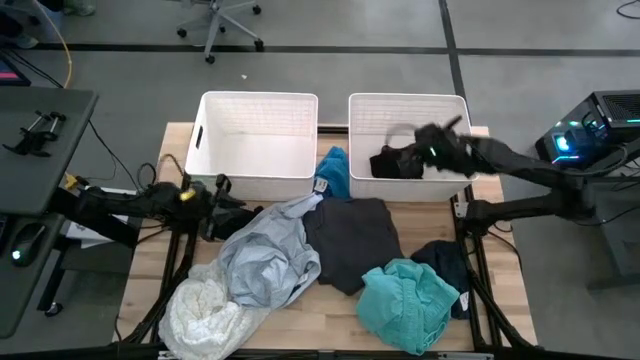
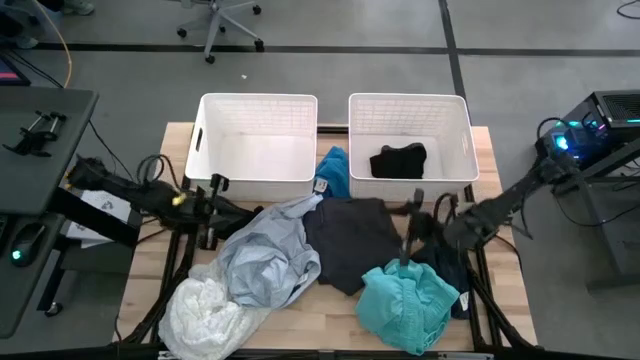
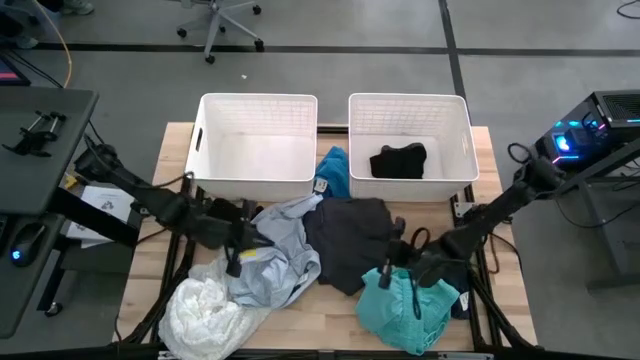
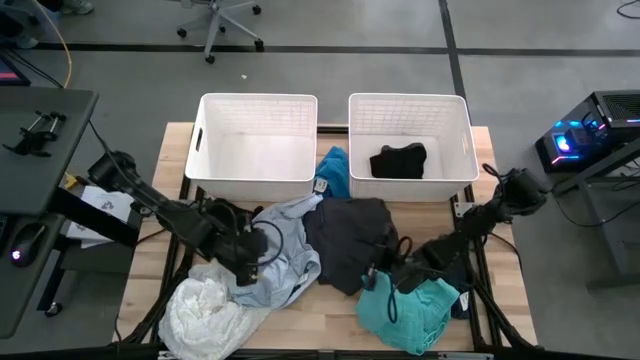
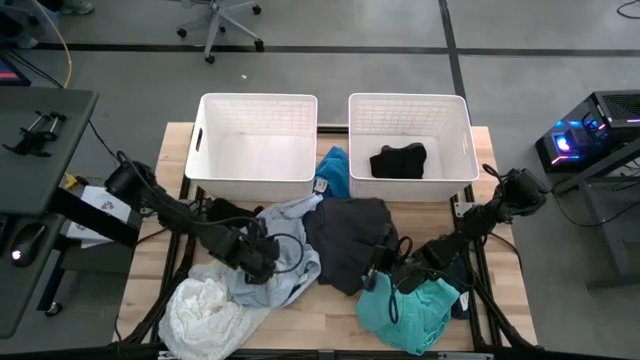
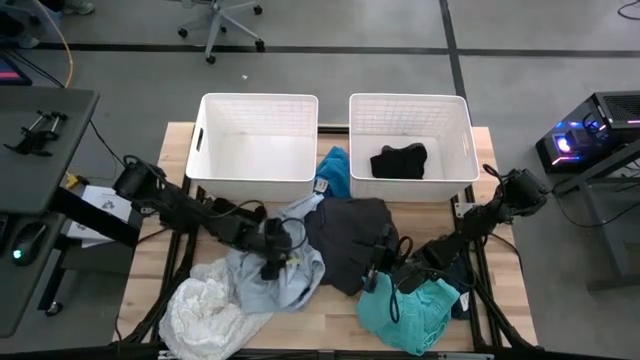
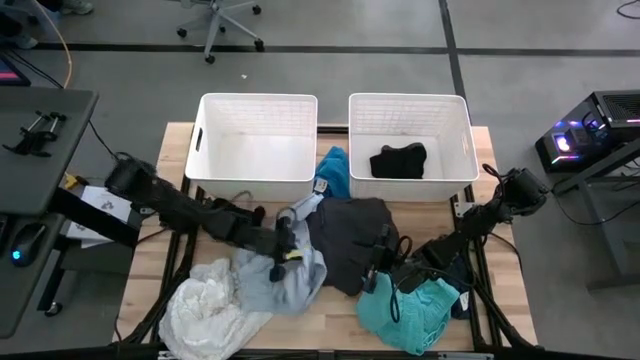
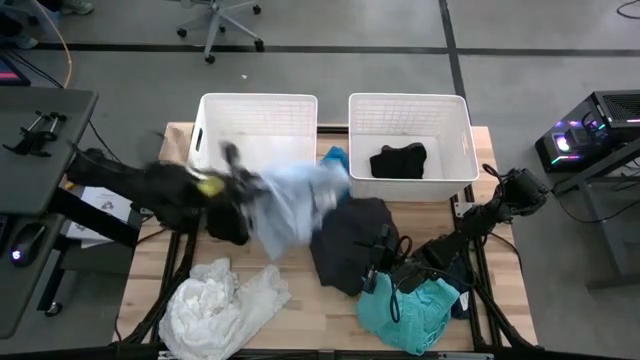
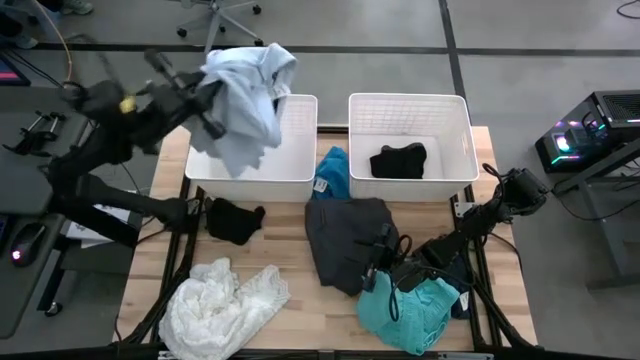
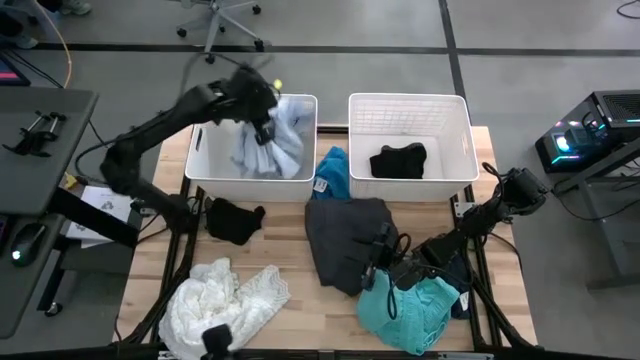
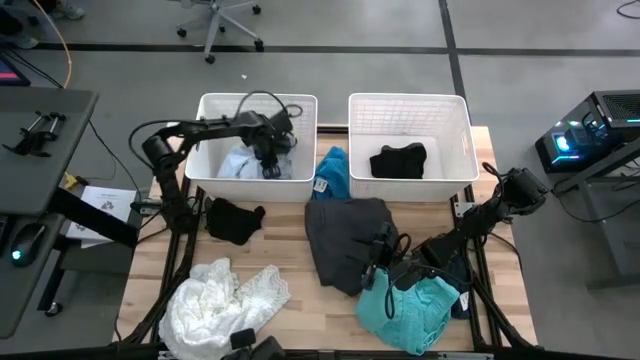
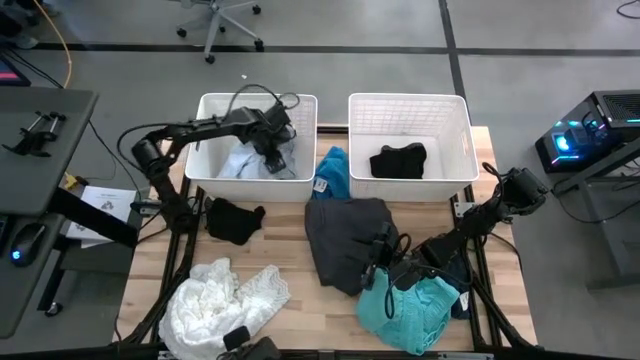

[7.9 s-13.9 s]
Task: Sort clothes
Put the light blue patient gown into the left white bin

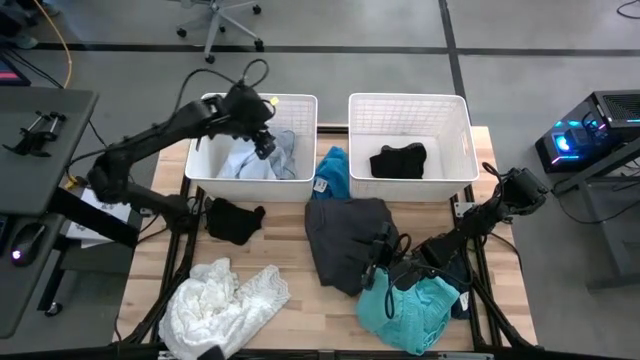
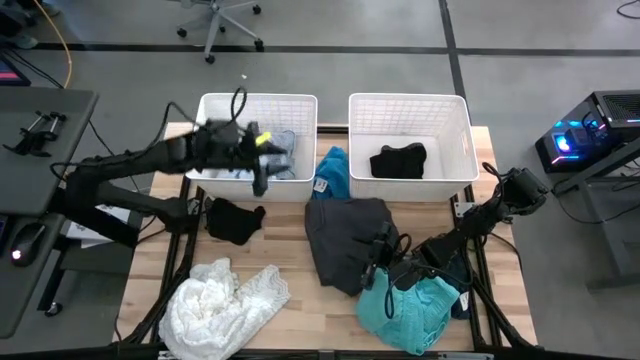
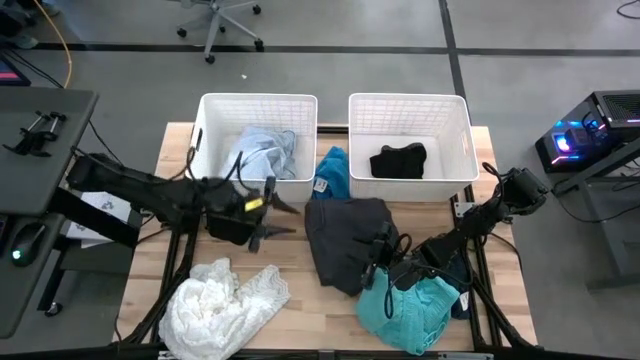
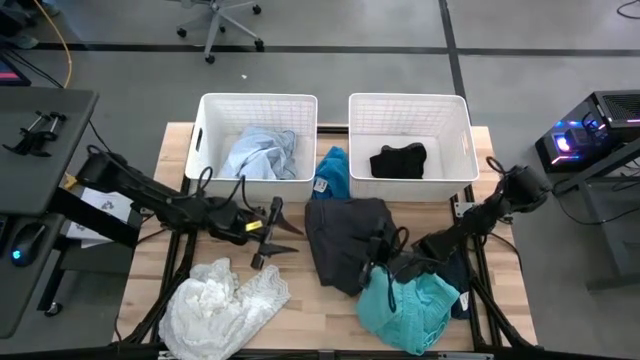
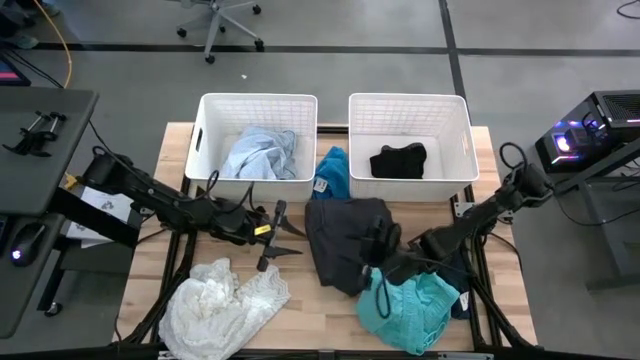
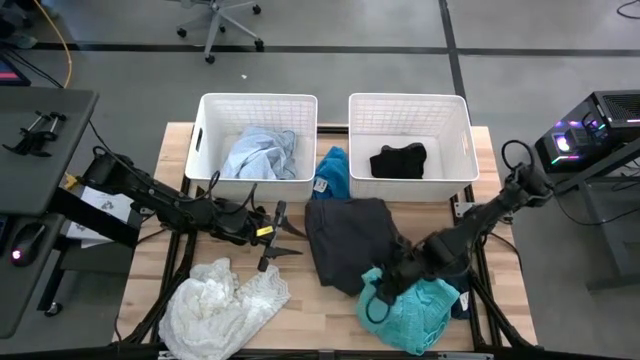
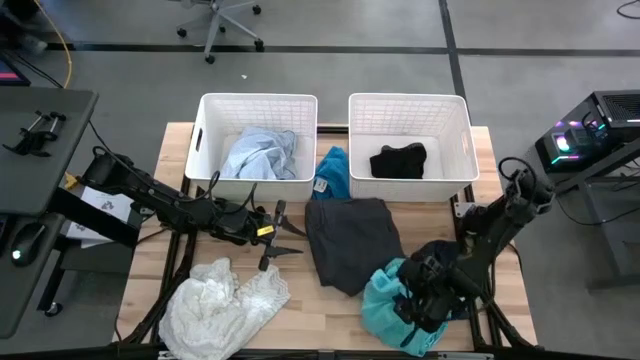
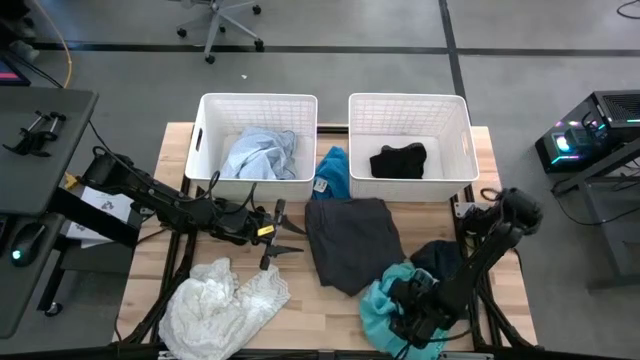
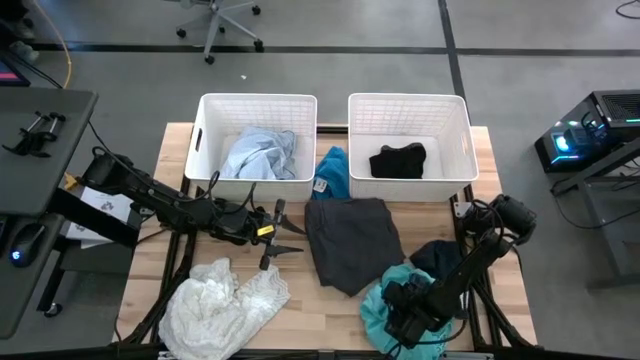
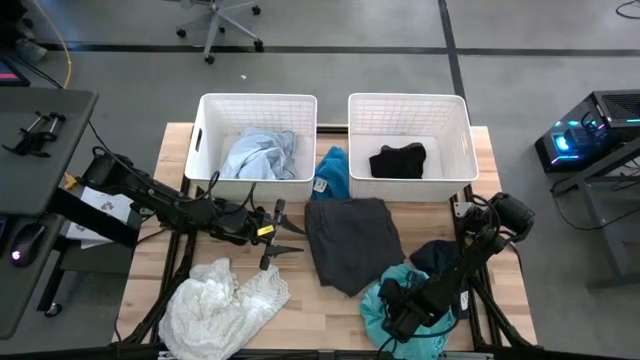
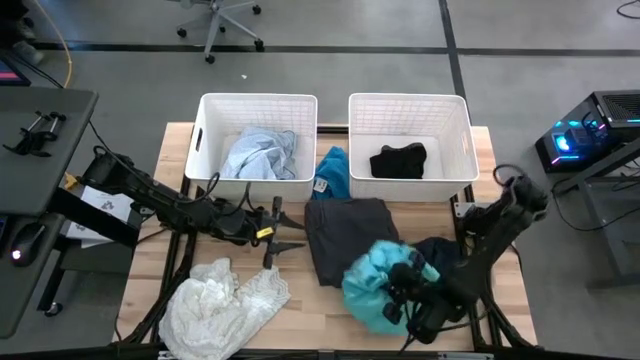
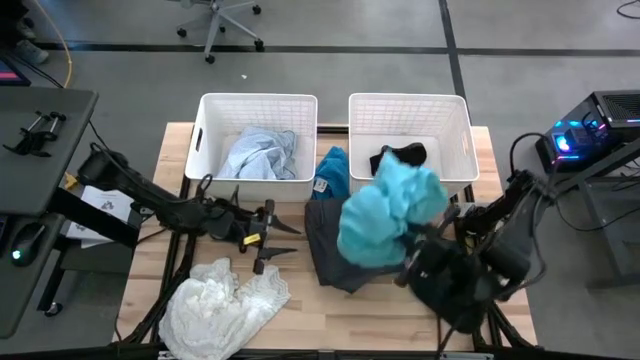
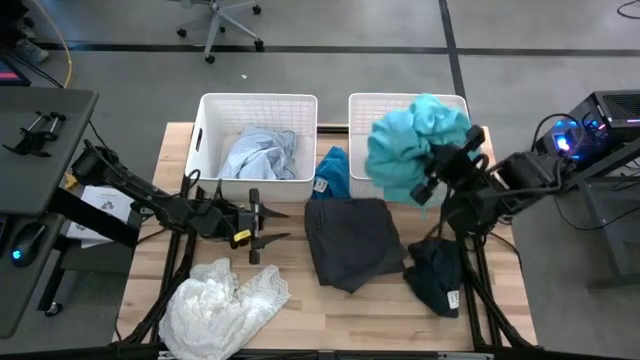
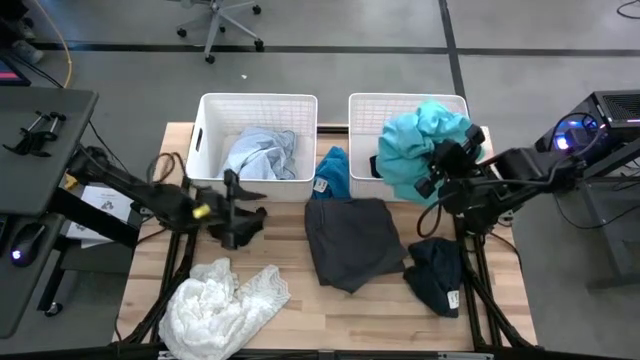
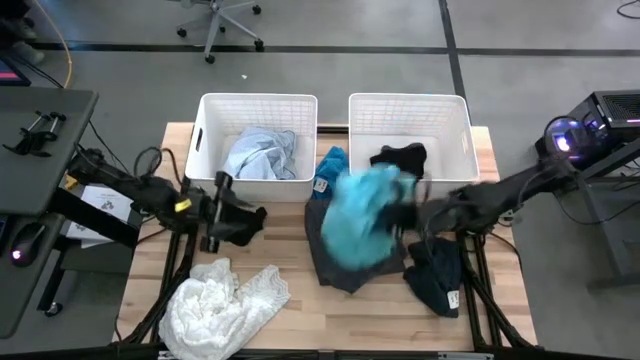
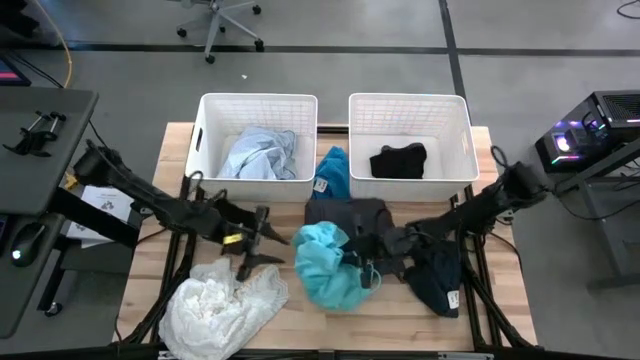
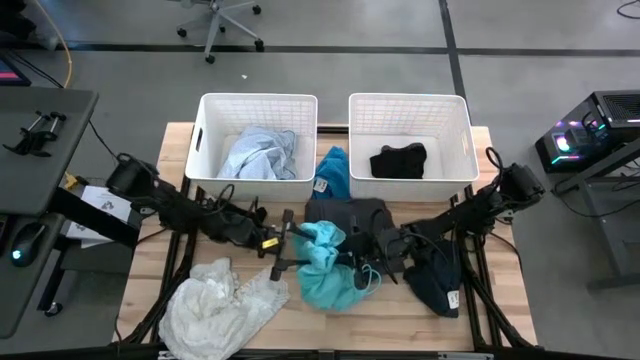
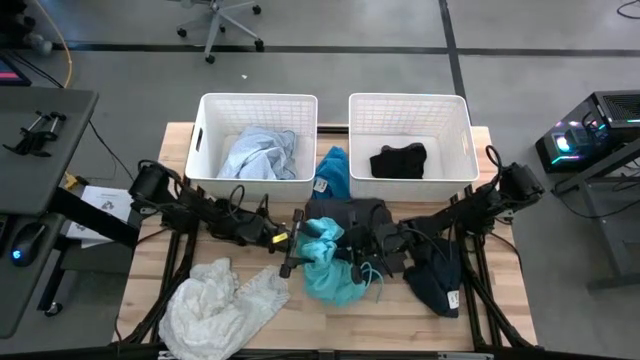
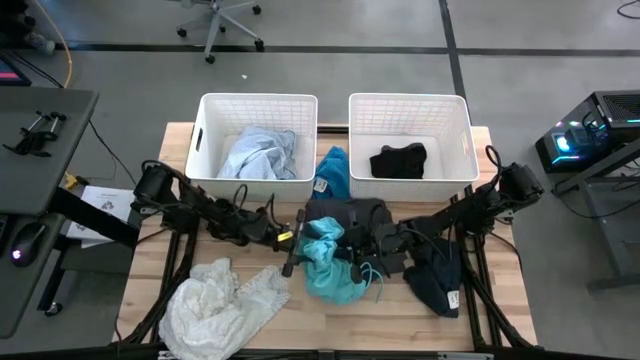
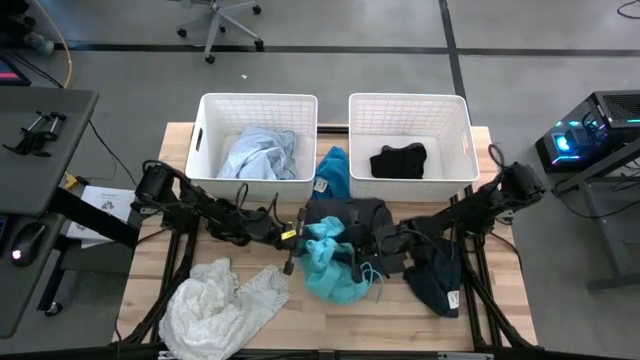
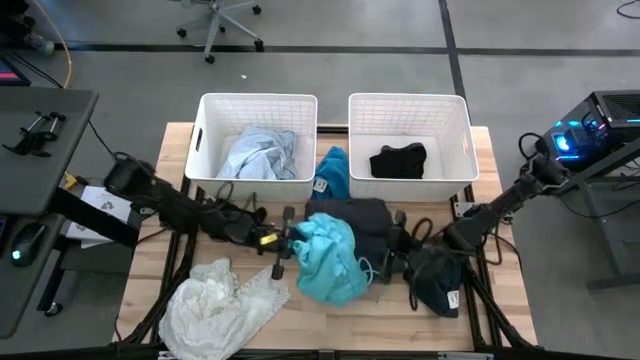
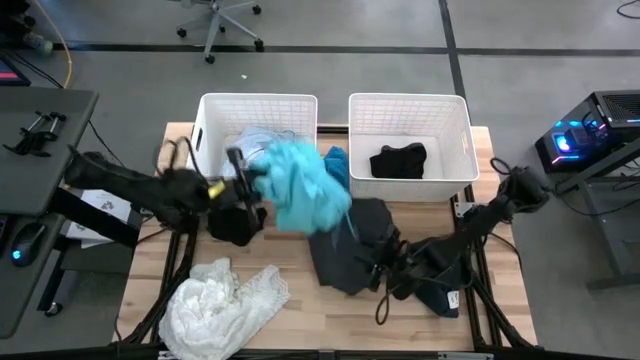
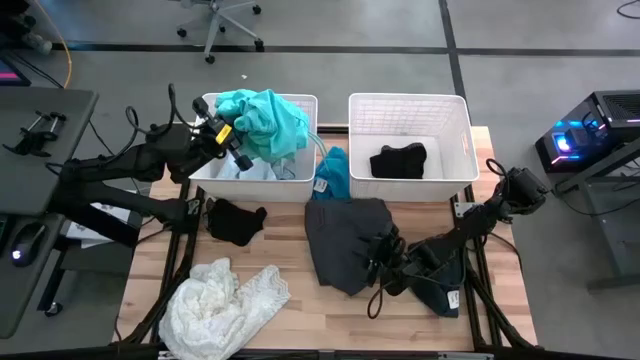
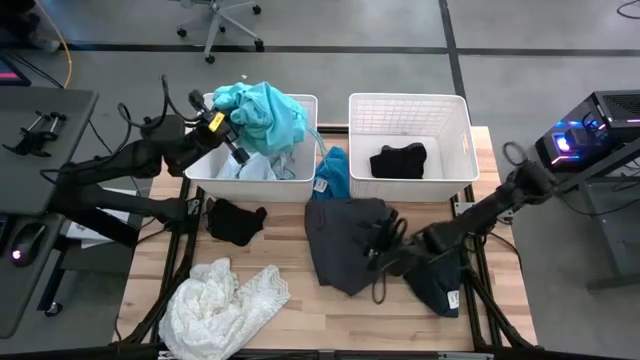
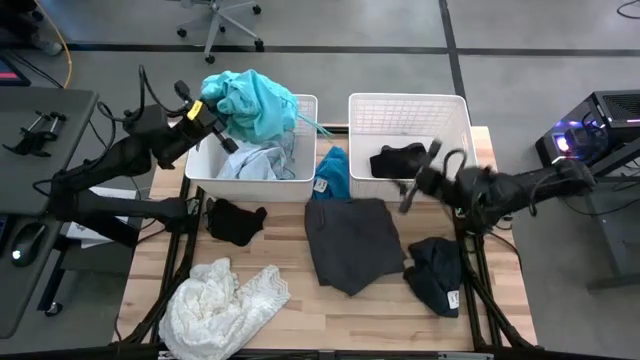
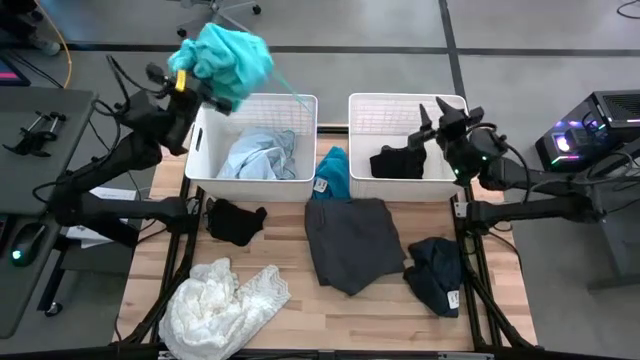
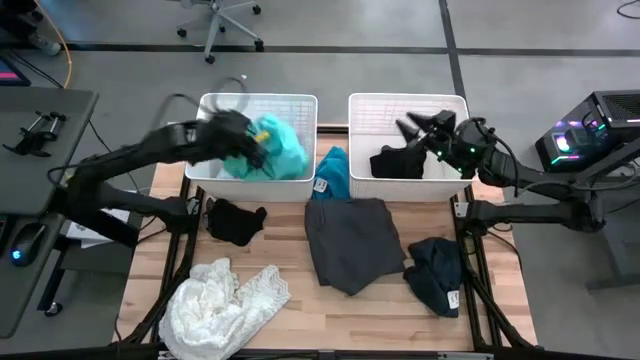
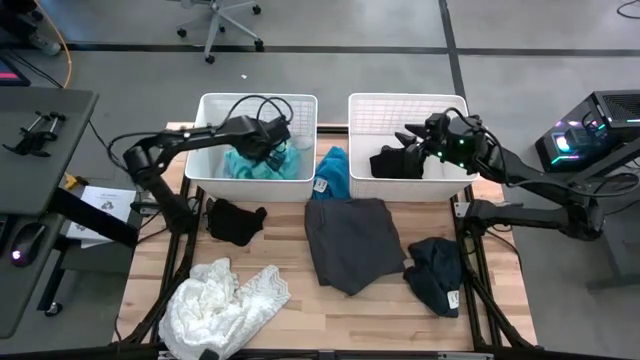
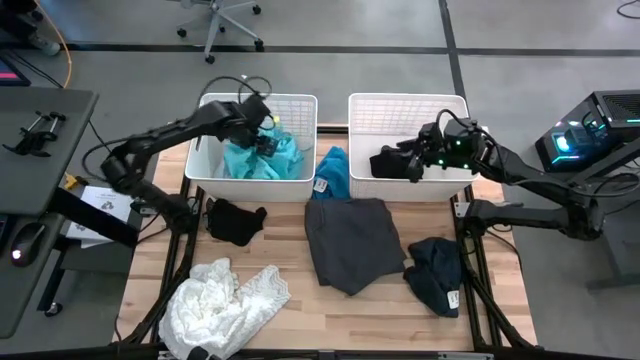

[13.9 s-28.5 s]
Put the light blue shorts into the left white bin

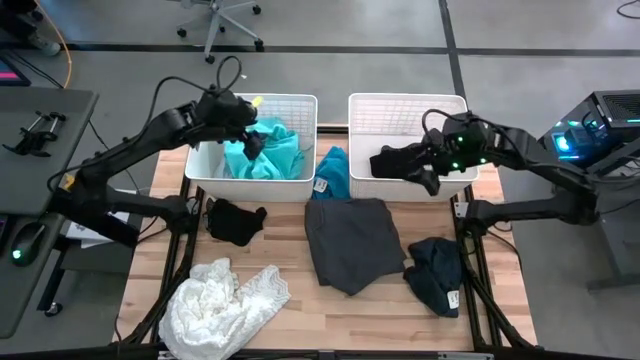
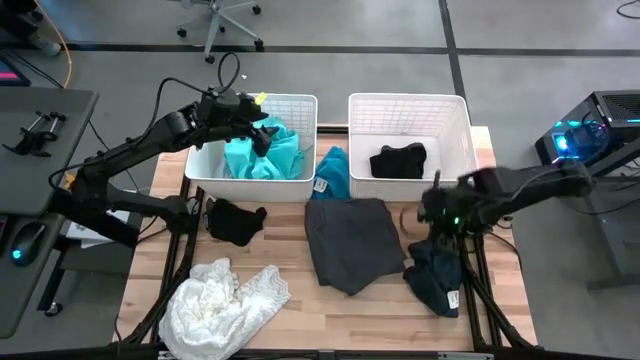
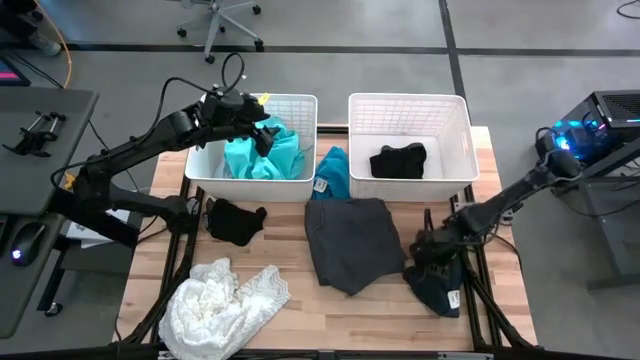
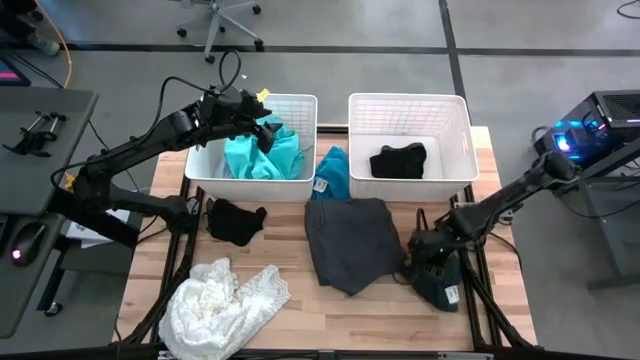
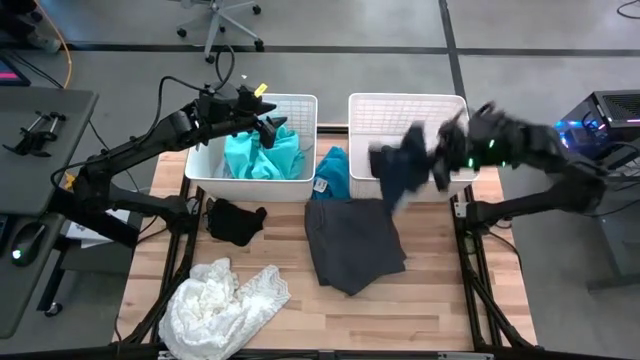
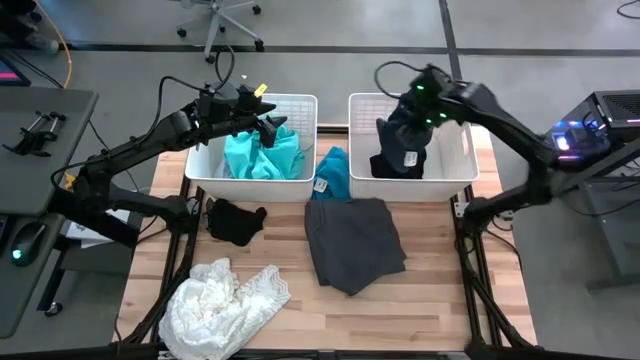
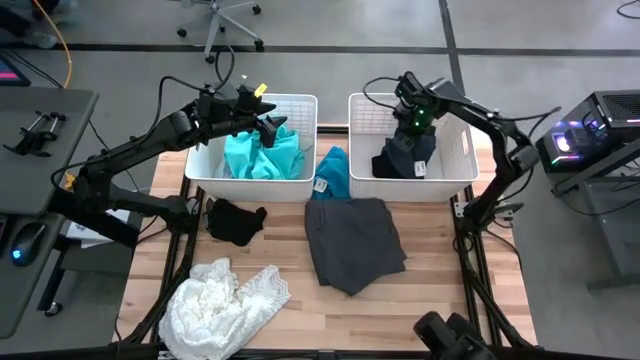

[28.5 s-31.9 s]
Put the dark blue underwear into the right white bin
